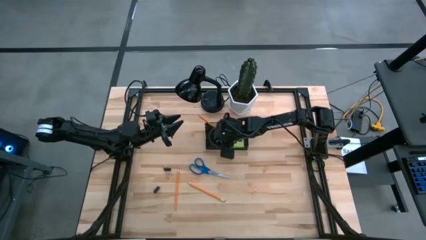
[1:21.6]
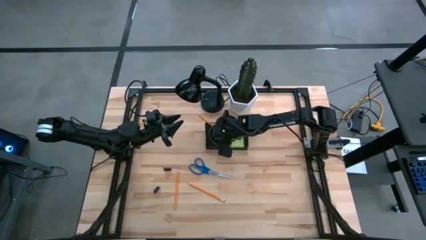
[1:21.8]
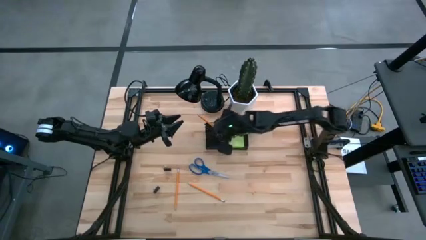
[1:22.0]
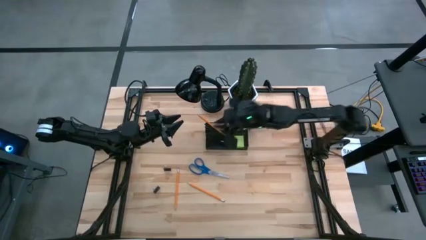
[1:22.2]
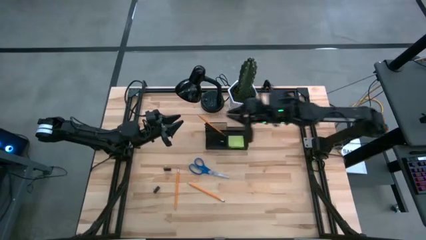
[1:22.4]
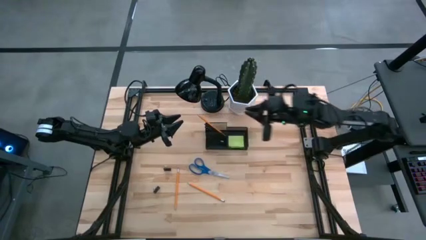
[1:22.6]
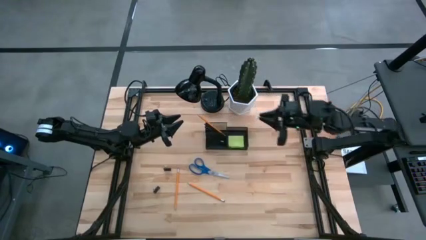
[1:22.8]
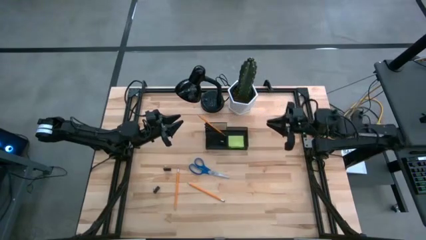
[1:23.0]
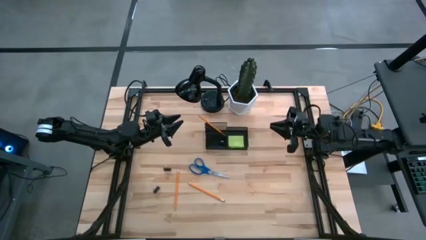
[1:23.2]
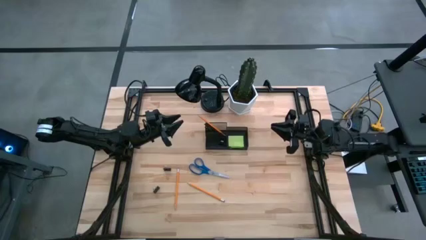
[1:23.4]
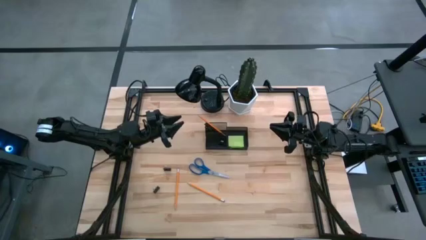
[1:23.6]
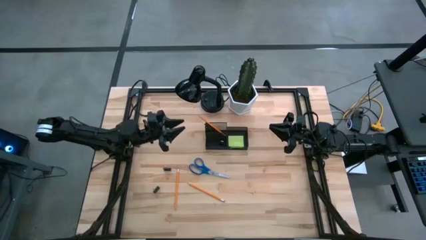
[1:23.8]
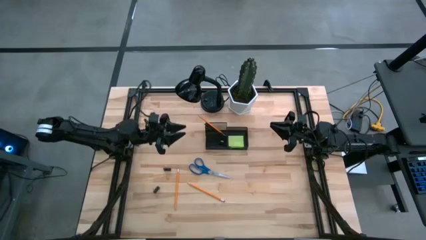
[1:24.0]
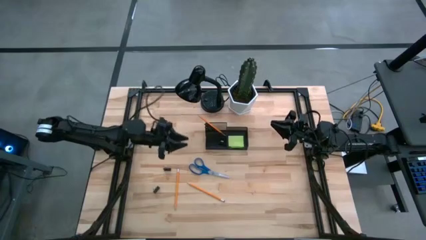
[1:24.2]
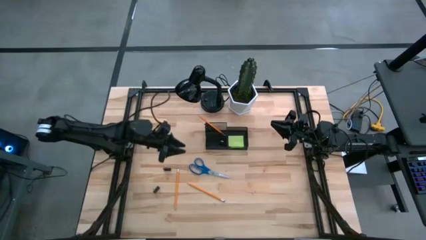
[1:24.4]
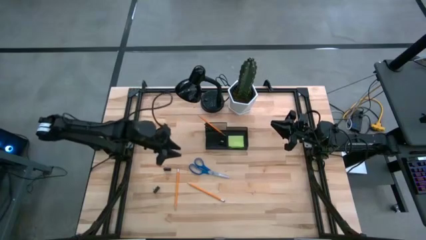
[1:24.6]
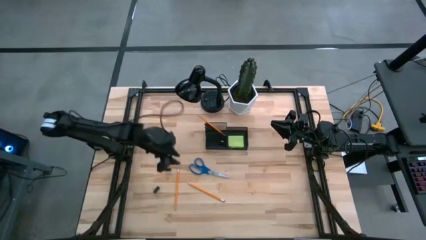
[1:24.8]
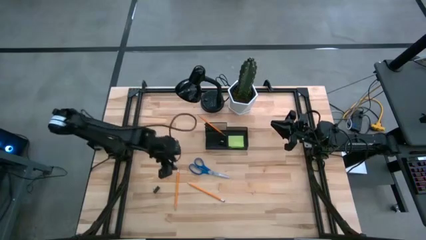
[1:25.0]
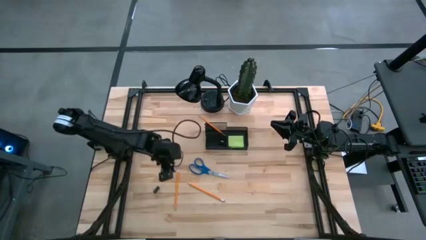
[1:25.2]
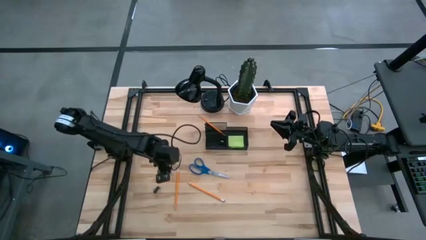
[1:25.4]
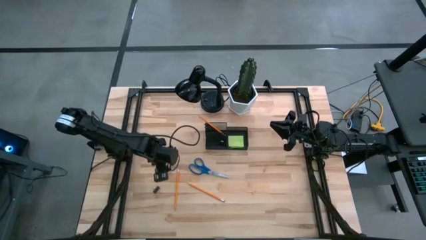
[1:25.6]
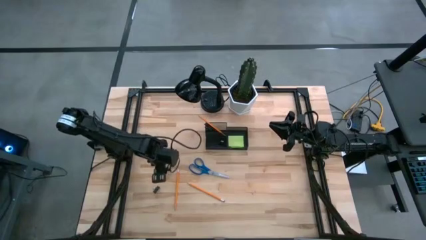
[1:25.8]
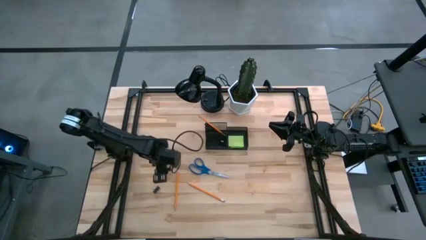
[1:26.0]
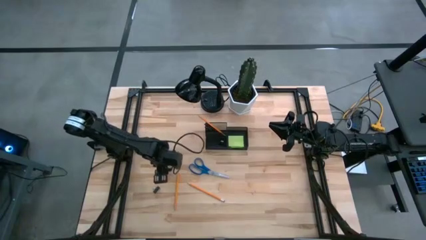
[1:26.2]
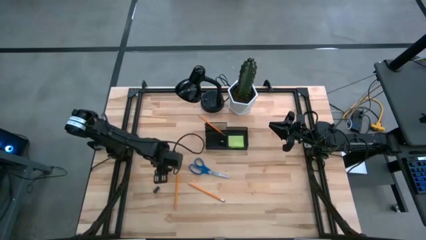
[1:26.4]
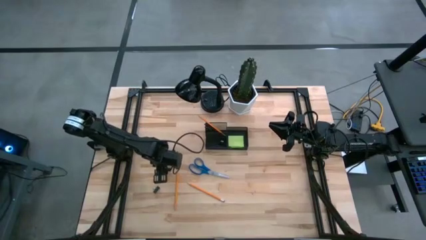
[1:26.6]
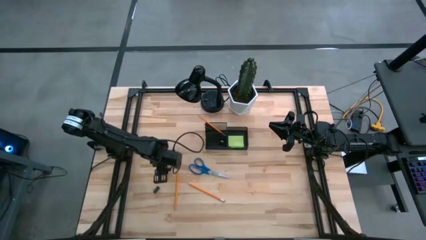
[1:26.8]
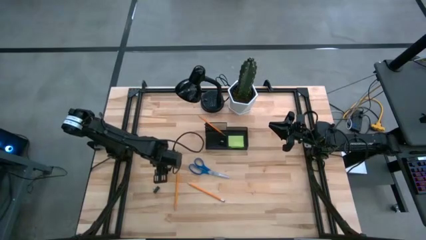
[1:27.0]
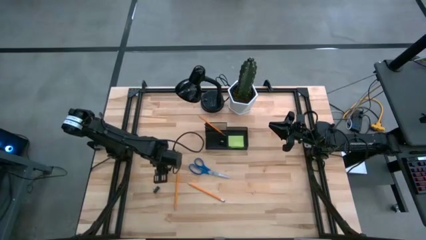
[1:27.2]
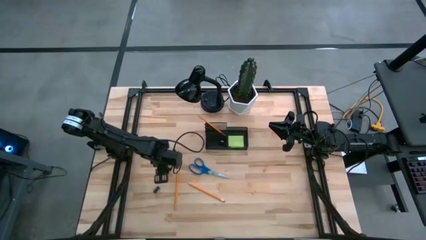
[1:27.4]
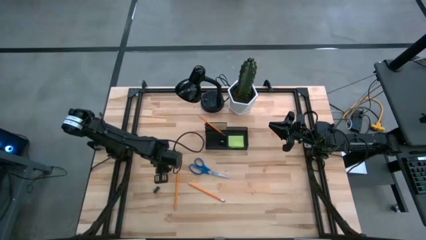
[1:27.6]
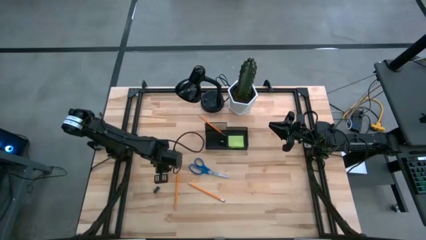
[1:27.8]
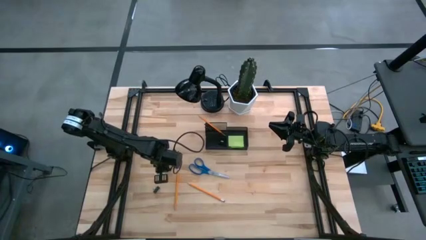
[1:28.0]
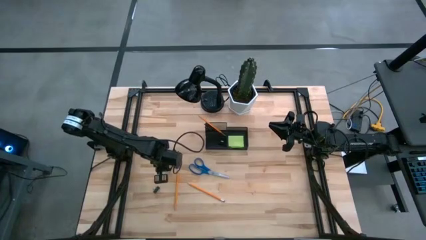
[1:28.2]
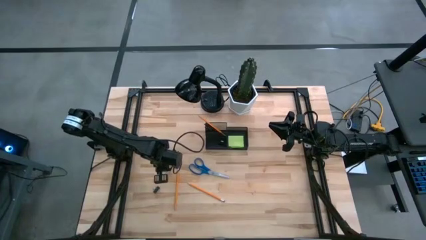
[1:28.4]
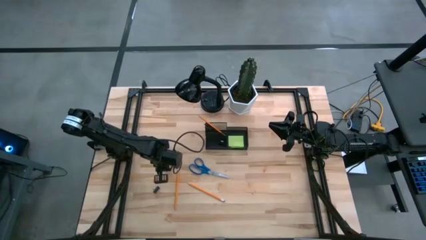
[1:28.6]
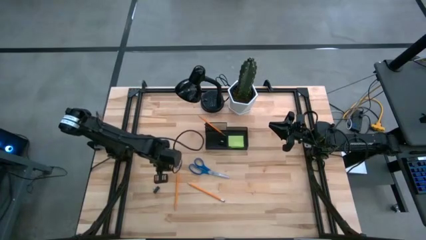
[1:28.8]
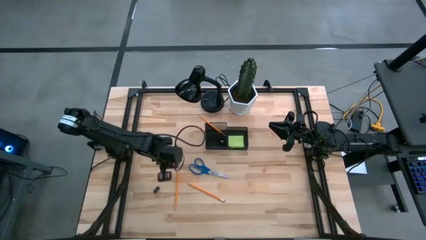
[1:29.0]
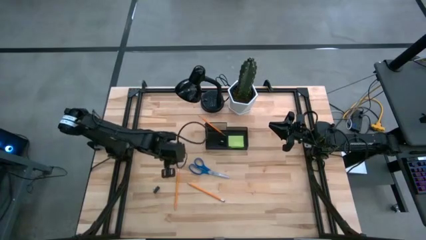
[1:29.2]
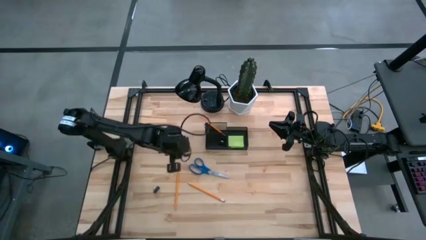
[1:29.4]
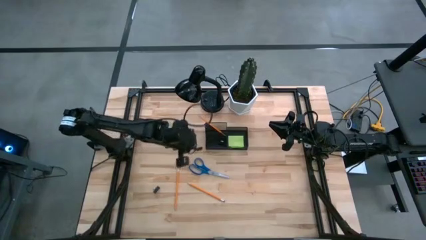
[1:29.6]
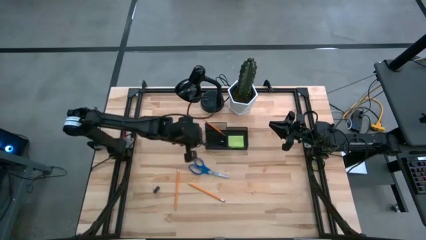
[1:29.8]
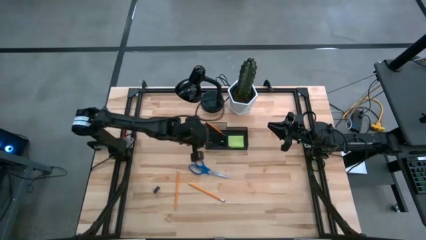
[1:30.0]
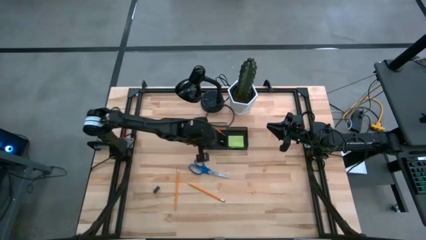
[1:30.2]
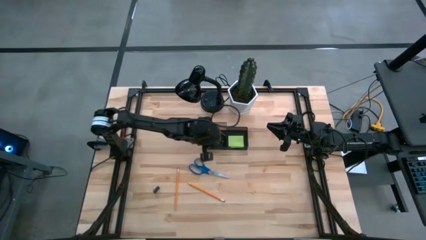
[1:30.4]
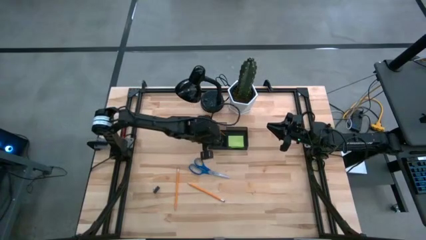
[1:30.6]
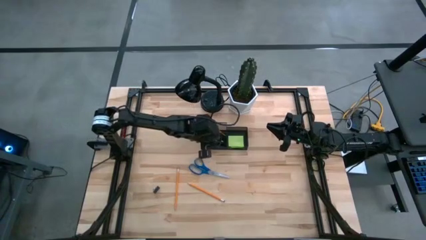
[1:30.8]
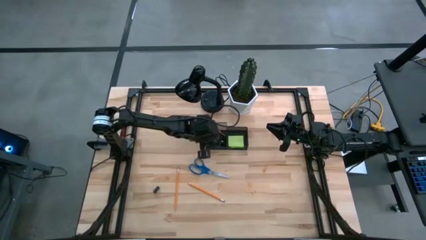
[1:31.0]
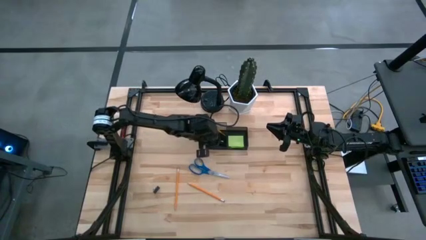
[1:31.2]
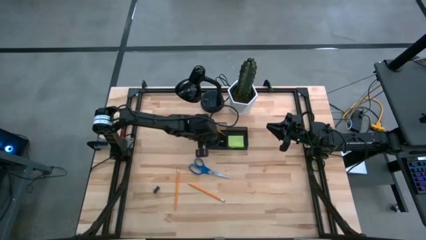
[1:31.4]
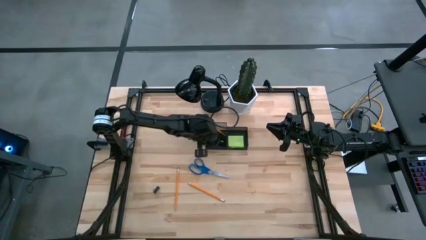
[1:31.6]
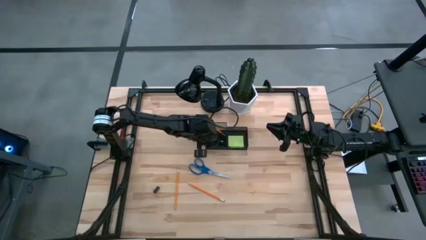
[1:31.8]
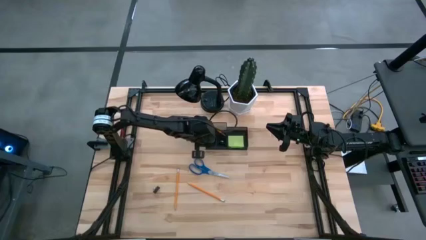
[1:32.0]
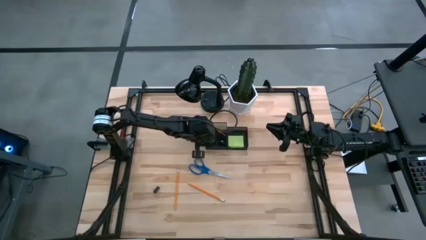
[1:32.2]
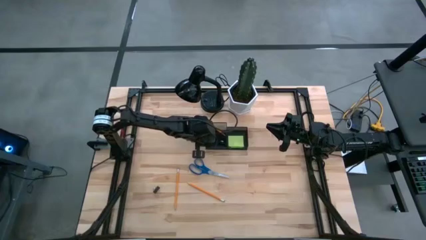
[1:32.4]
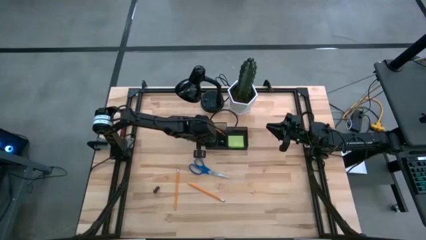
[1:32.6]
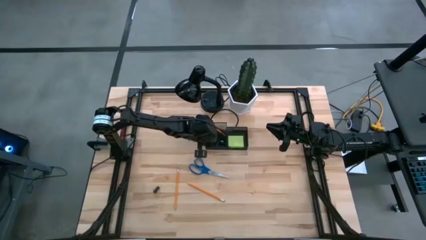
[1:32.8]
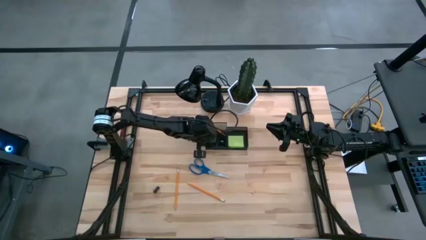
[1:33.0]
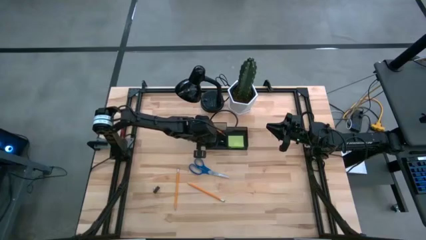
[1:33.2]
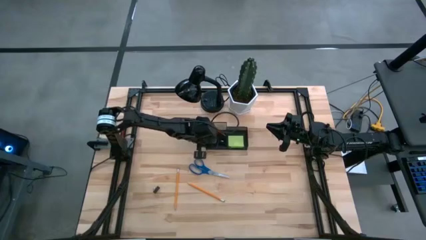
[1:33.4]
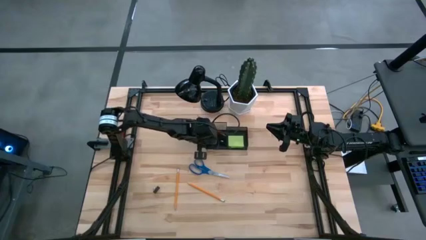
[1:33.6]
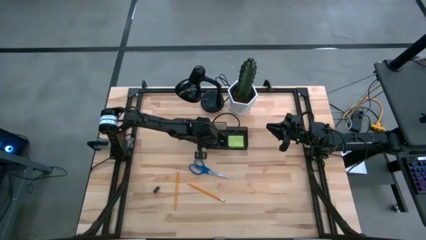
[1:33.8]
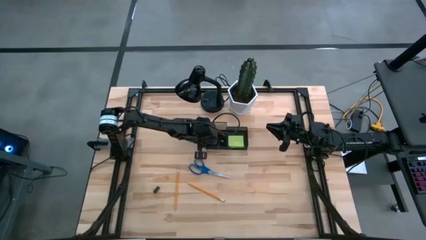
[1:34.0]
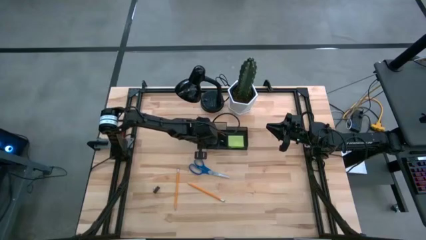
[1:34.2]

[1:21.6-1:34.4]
Task: Pick and place office supplies into organizer
Put the top clip into the mesh desk organizer
